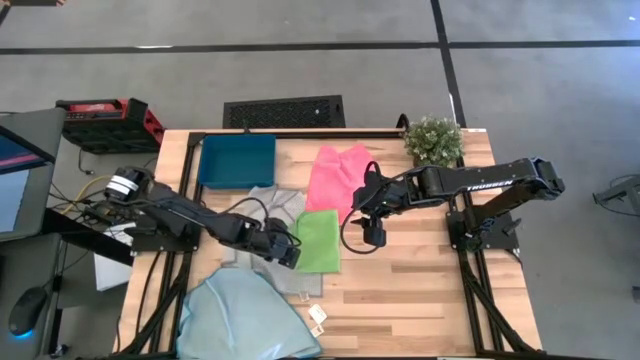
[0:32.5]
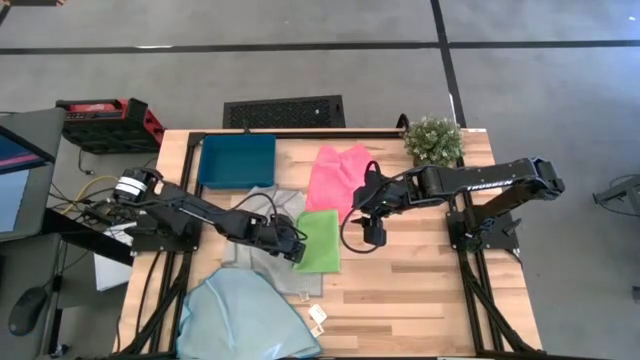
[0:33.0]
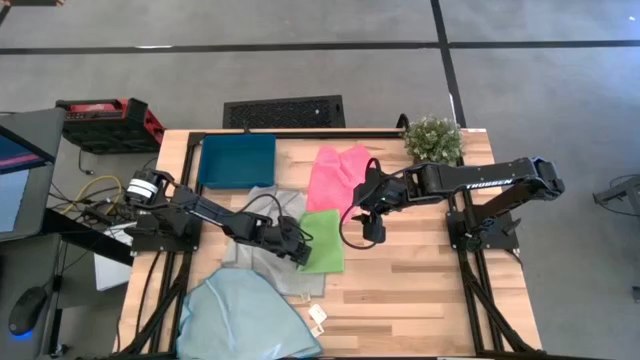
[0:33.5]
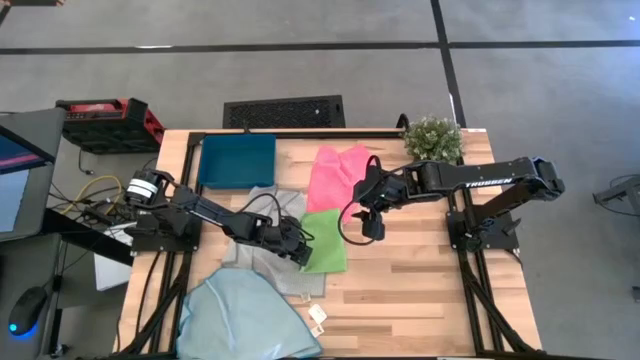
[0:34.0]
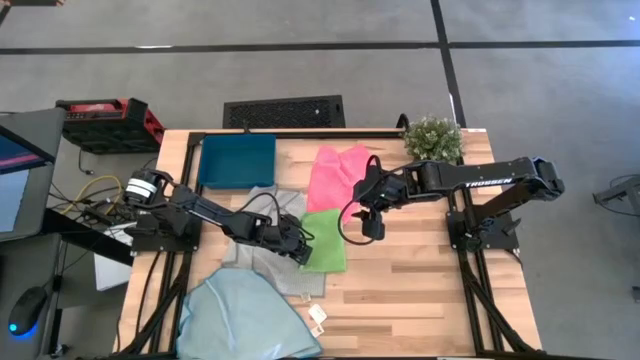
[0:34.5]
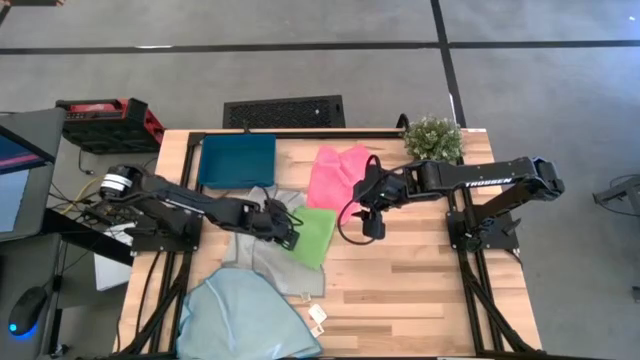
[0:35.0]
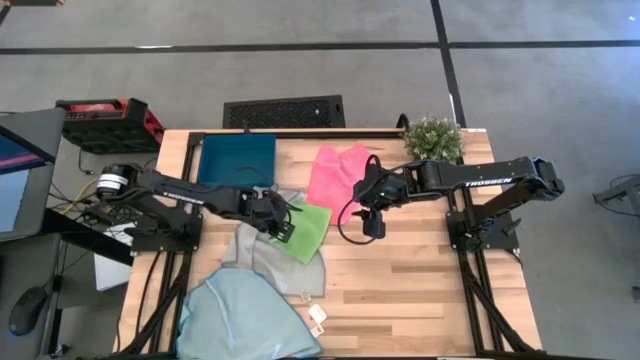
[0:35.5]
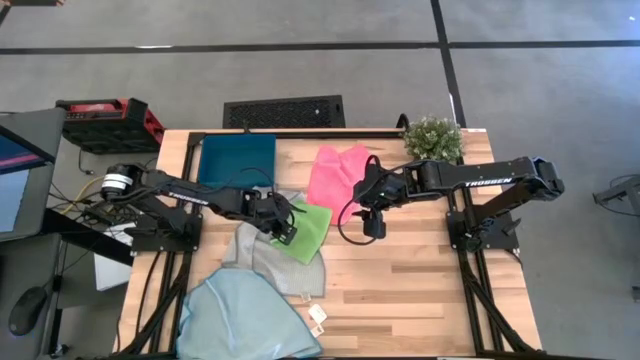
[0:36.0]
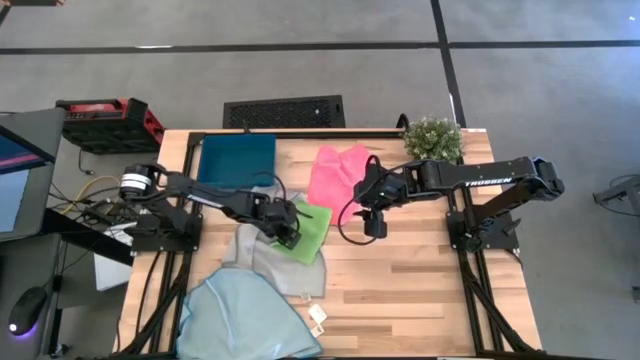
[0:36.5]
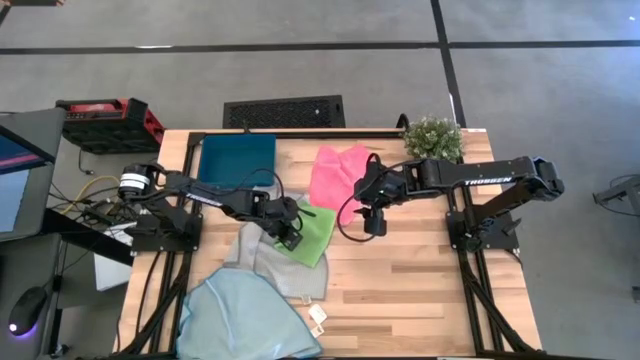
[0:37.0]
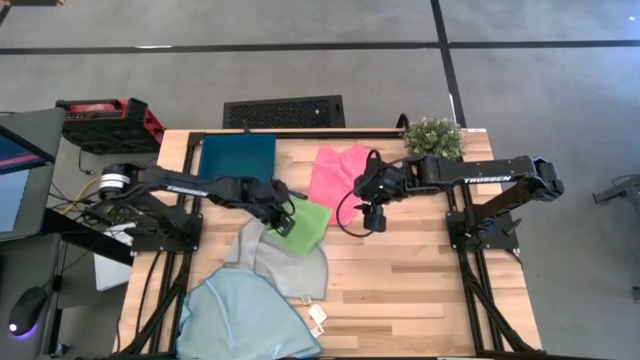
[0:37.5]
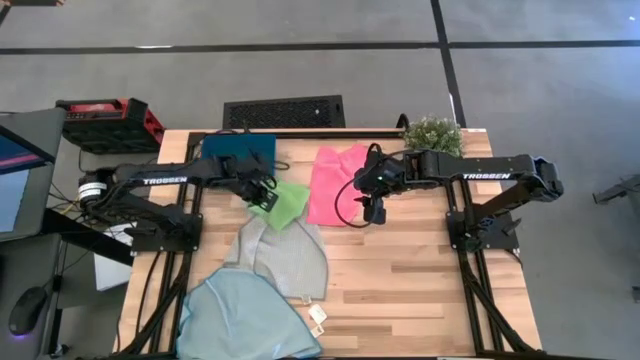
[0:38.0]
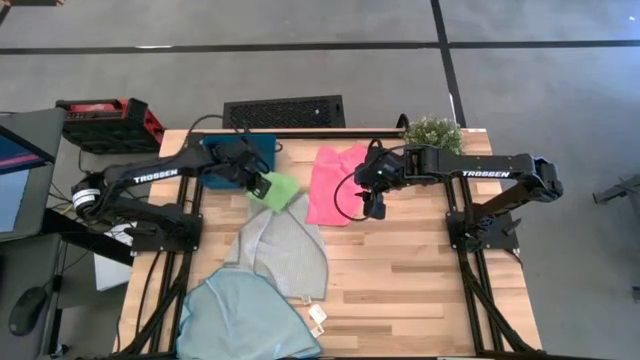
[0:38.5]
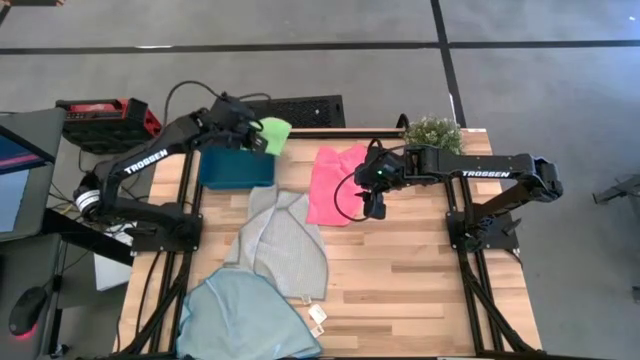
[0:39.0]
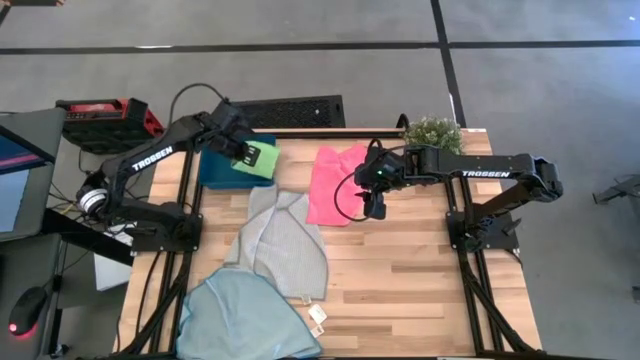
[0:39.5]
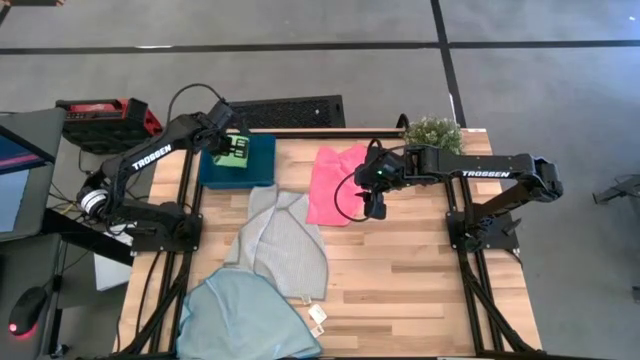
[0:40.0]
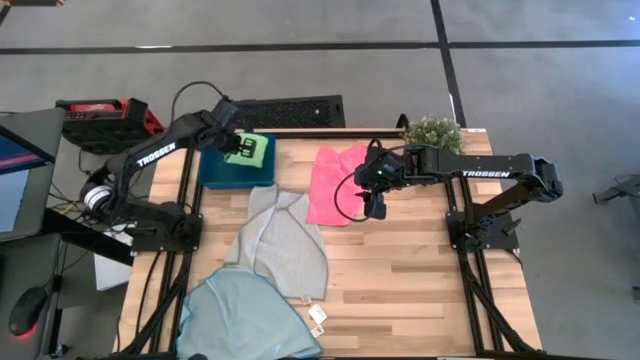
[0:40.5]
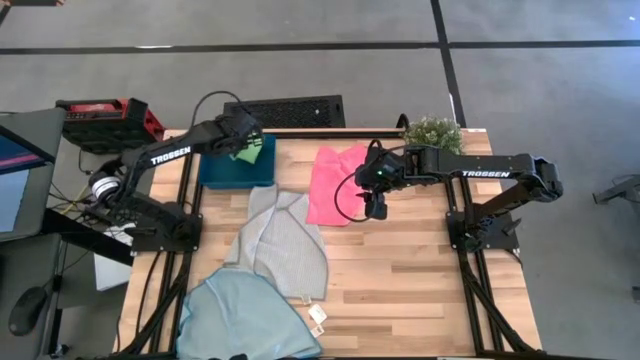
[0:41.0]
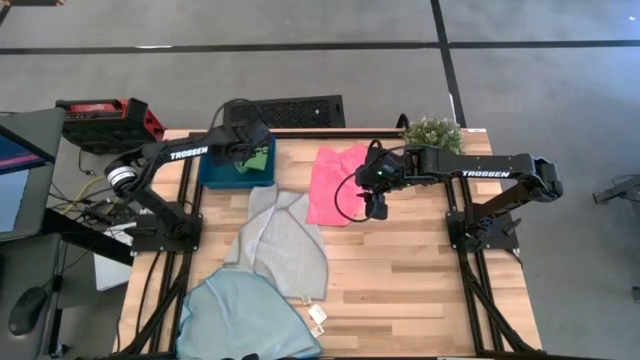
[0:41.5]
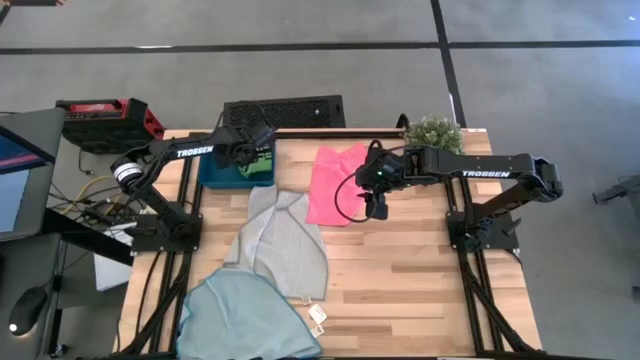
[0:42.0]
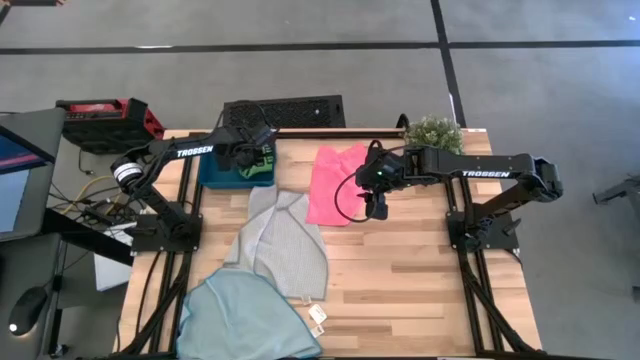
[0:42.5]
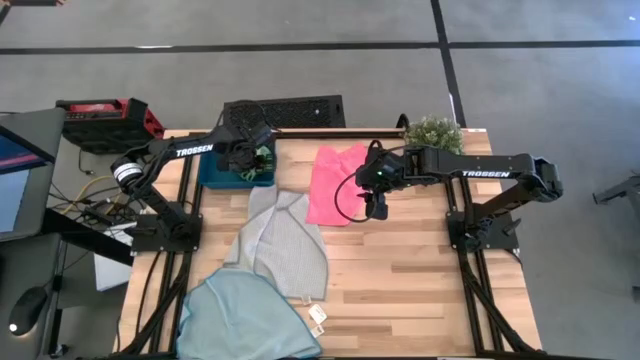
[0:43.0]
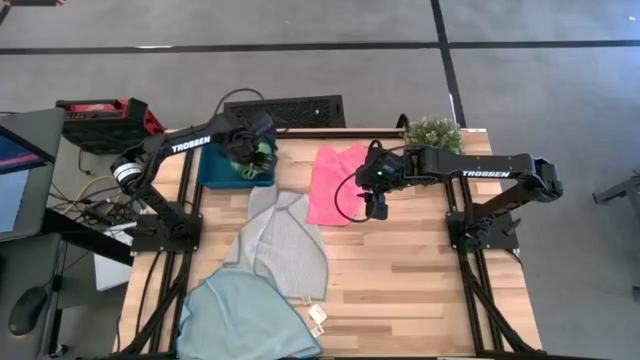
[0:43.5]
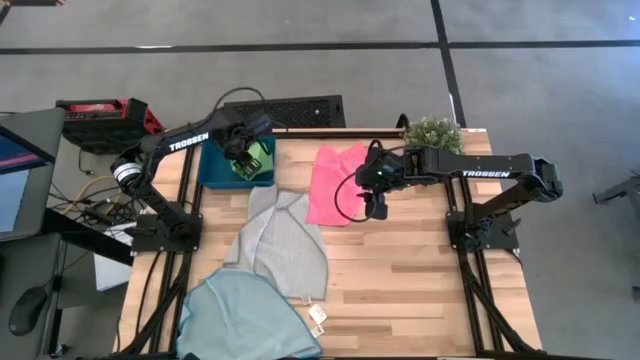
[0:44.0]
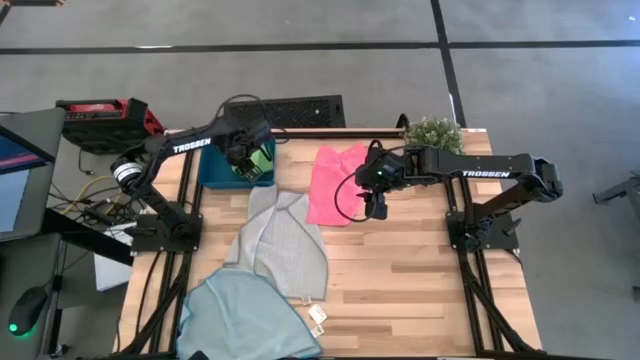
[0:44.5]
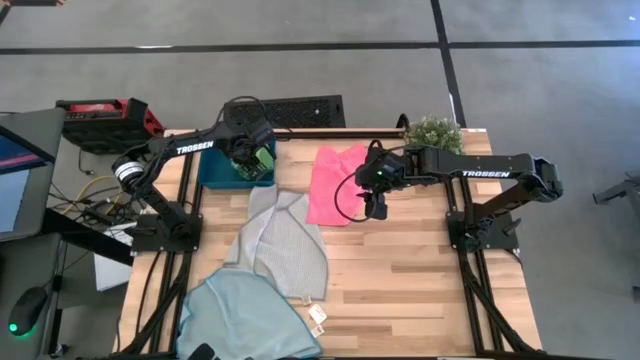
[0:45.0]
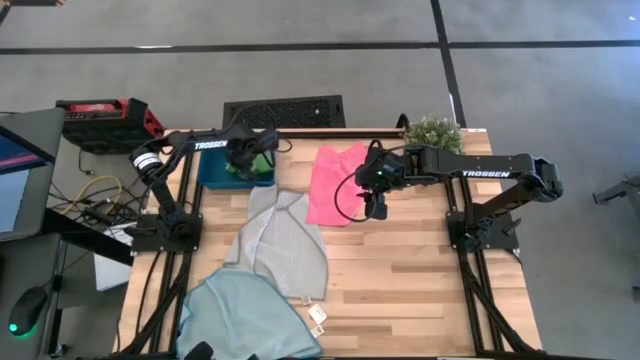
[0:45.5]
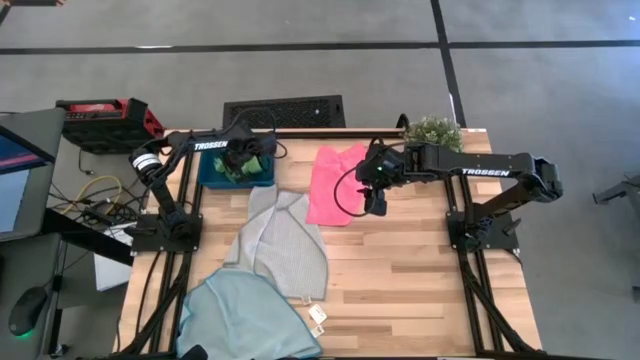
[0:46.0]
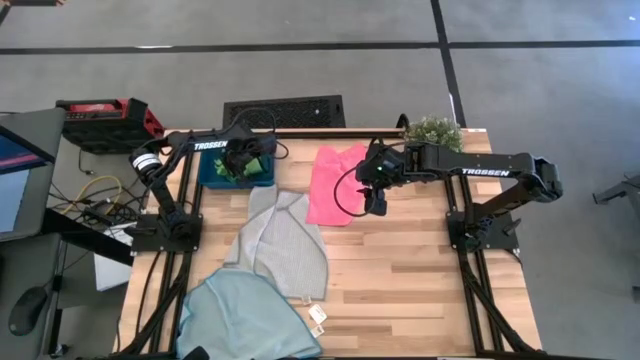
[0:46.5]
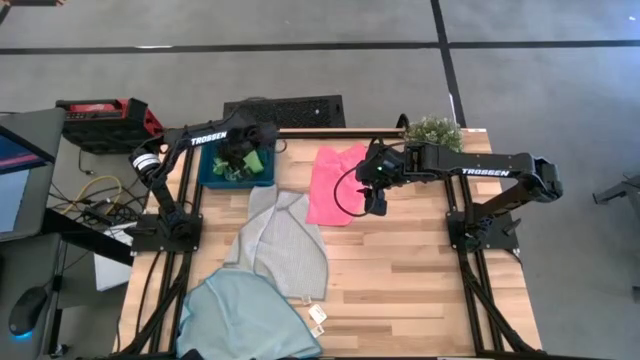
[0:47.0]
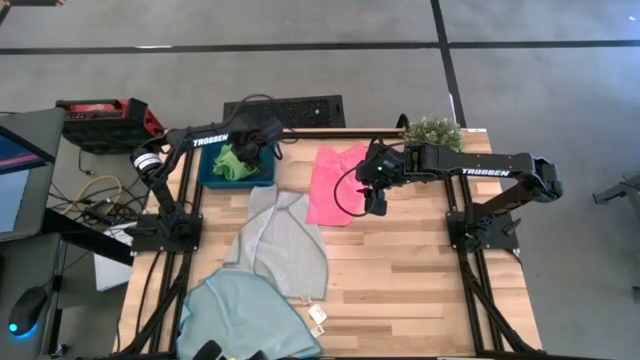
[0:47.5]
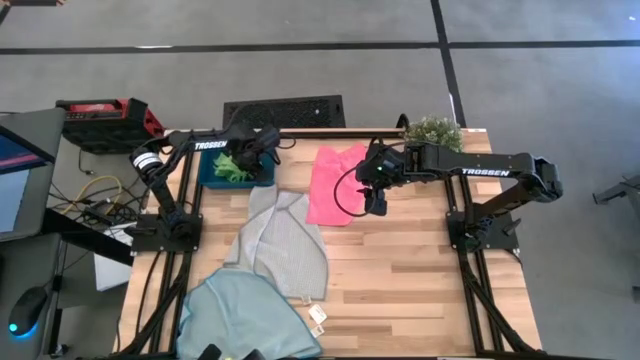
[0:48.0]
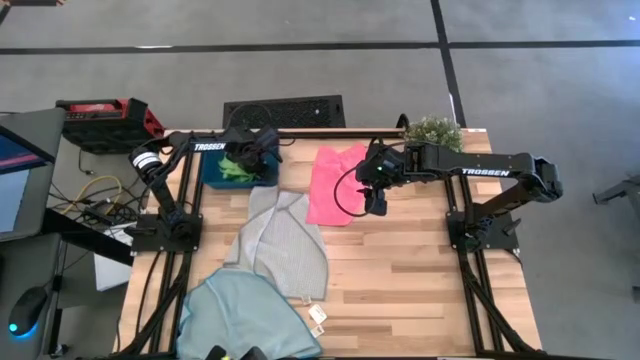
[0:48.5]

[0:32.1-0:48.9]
Task: Fold microfiber towels
Put the green cloth into the blue bin

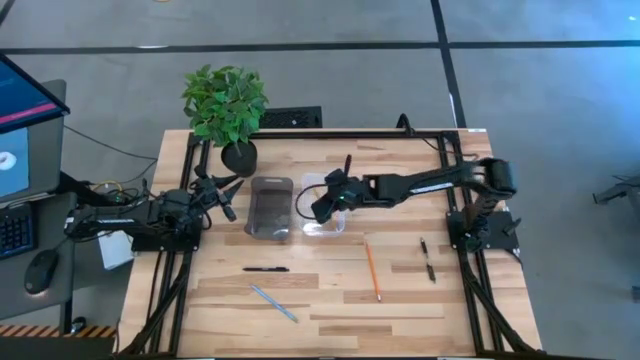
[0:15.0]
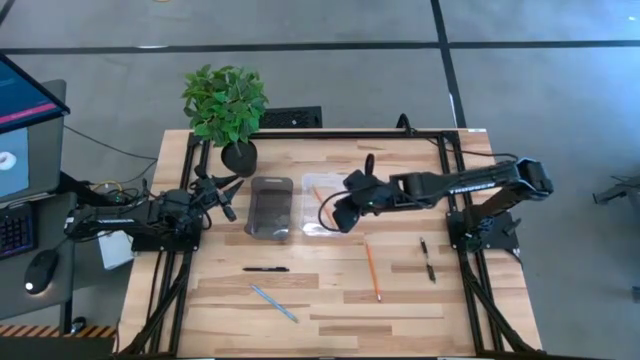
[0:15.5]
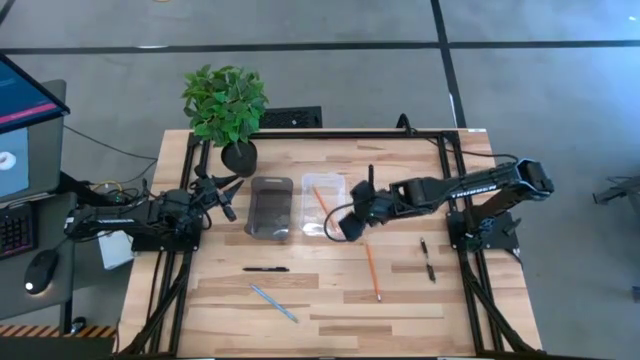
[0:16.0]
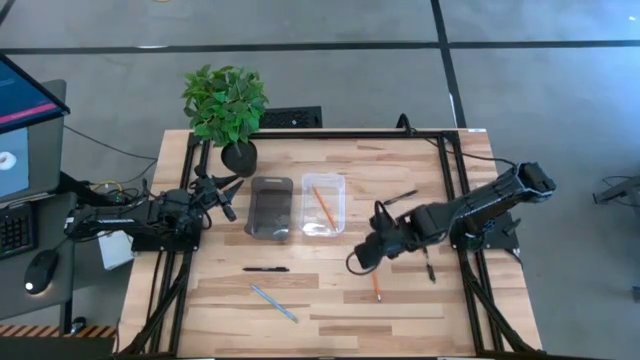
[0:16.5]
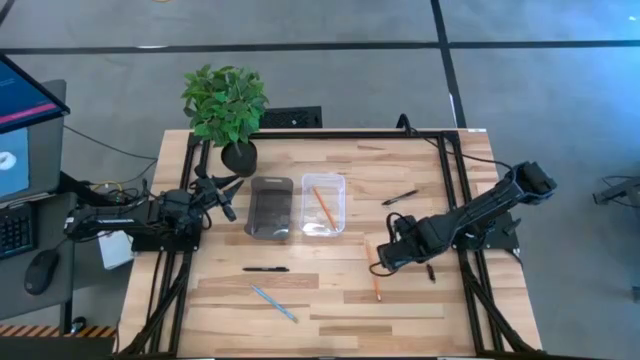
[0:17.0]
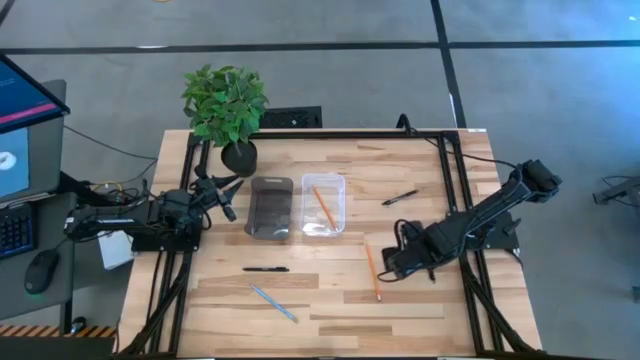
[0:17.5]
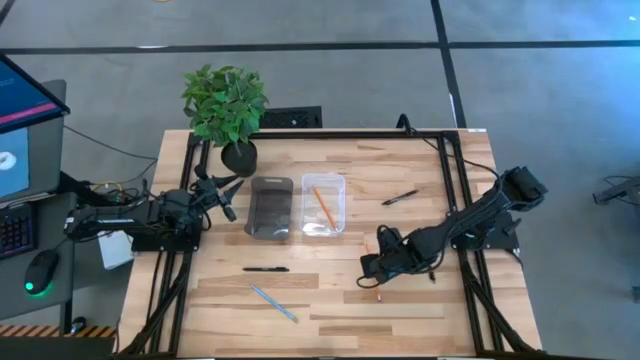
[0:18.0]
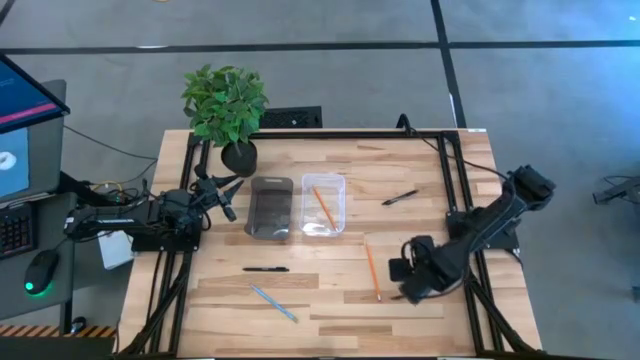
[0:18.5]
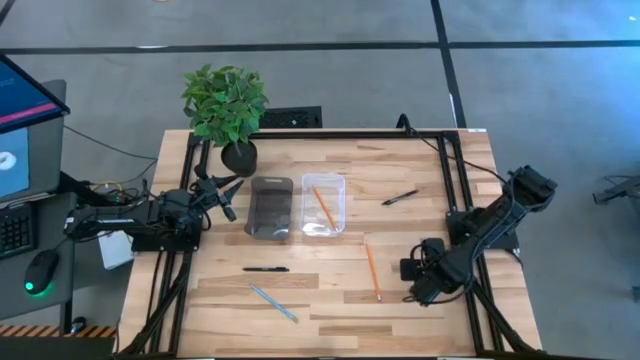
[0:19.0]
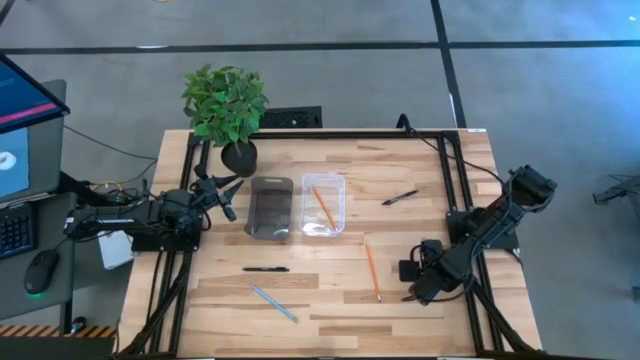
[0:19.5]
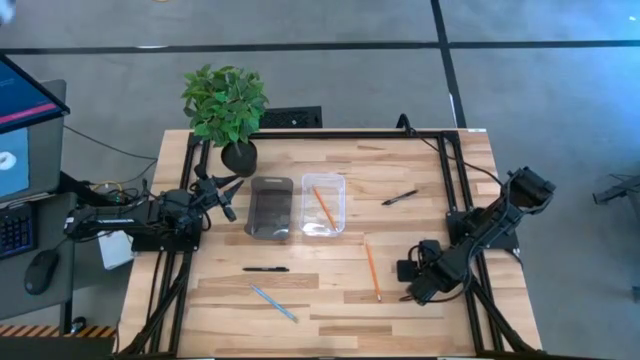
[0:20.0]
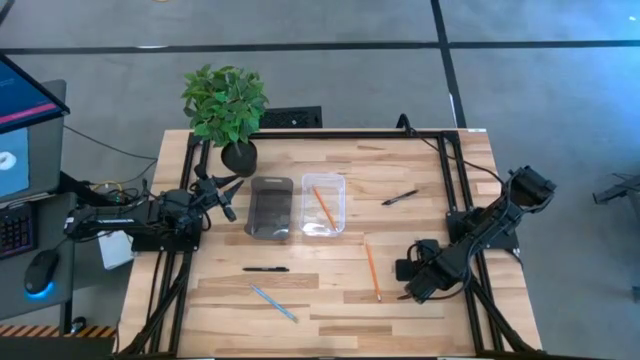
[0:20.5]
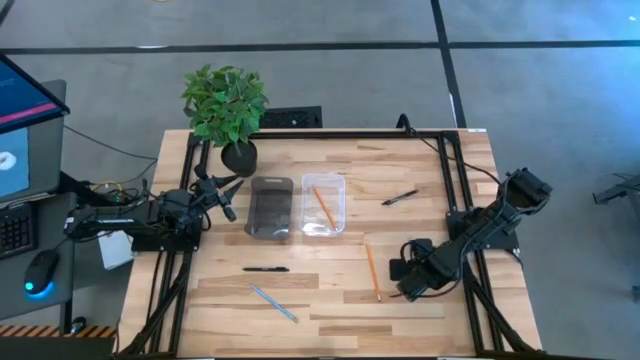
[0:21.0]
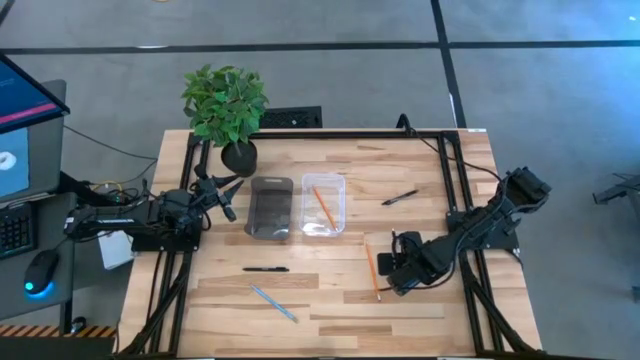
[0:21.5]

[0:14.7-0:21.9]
Task: Sort pens & pencils
Put the bottom right black pen into the black bin
